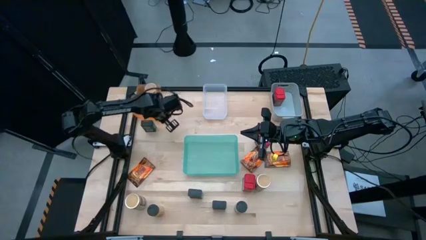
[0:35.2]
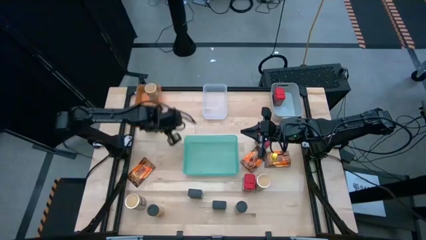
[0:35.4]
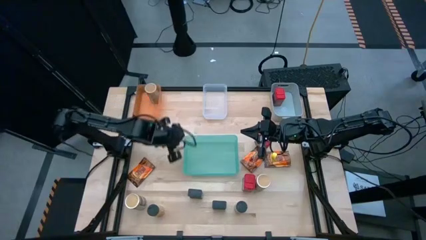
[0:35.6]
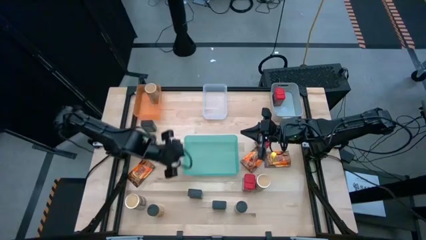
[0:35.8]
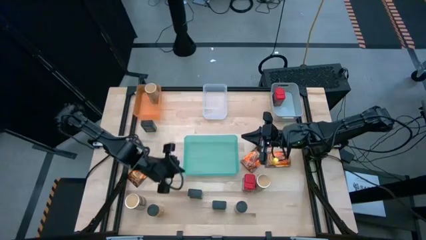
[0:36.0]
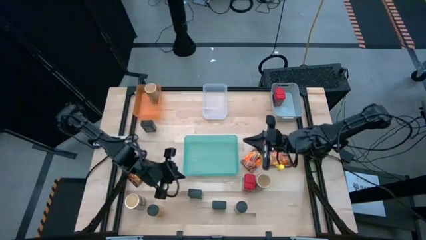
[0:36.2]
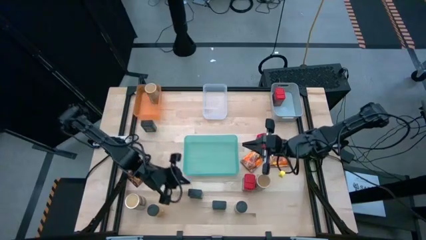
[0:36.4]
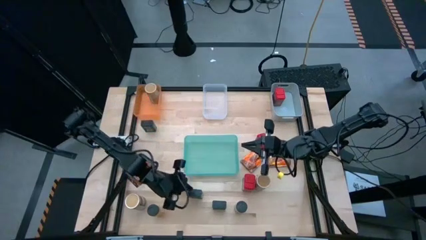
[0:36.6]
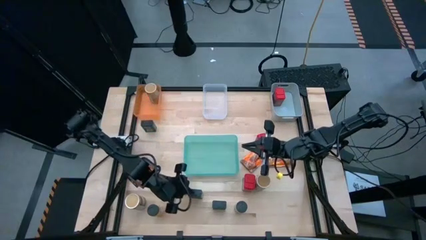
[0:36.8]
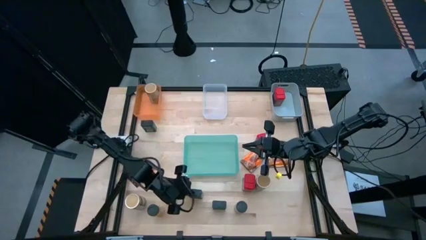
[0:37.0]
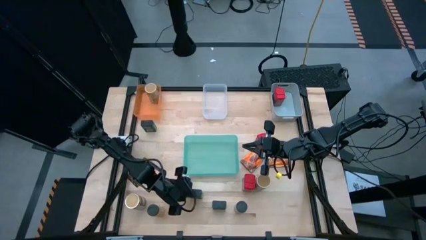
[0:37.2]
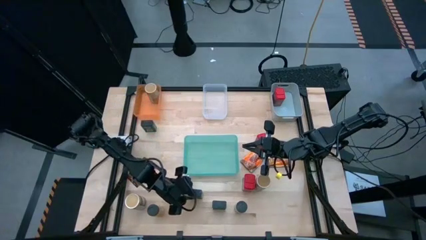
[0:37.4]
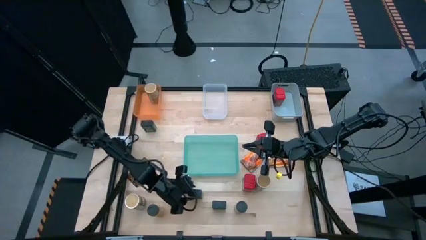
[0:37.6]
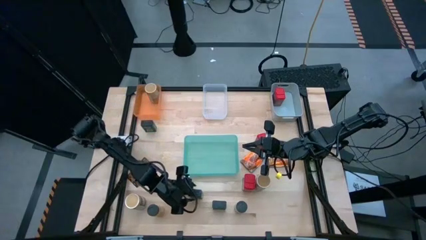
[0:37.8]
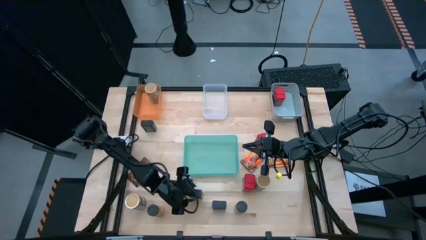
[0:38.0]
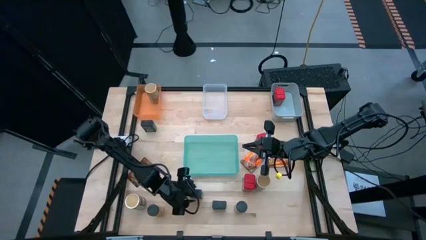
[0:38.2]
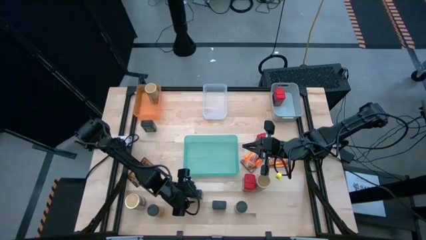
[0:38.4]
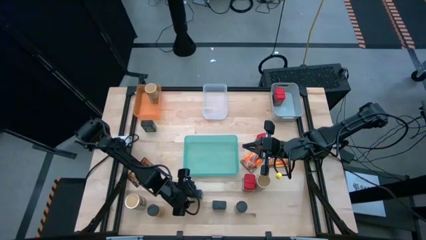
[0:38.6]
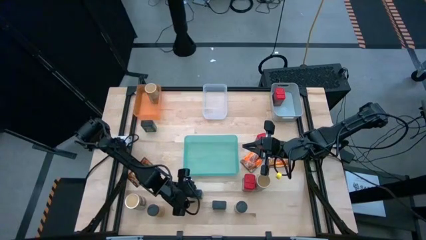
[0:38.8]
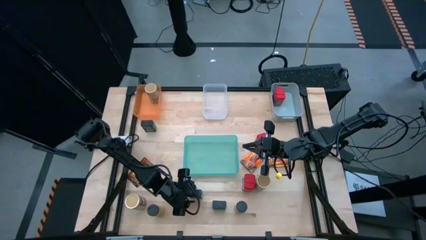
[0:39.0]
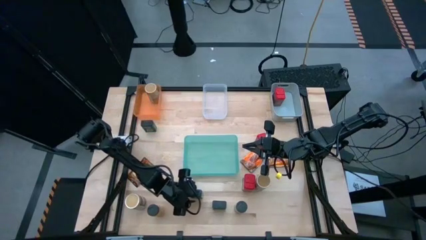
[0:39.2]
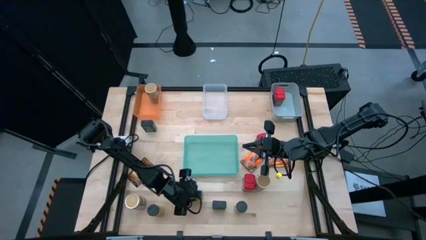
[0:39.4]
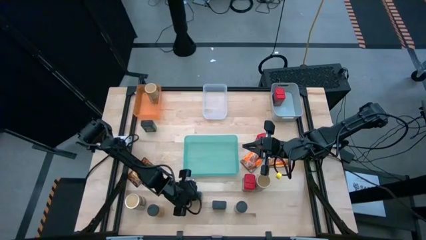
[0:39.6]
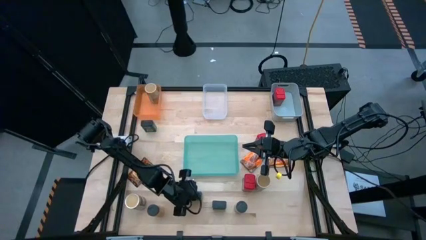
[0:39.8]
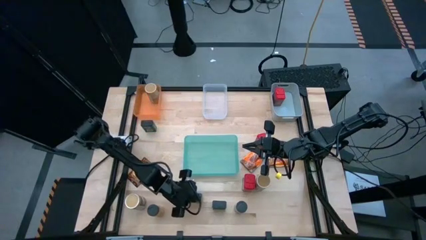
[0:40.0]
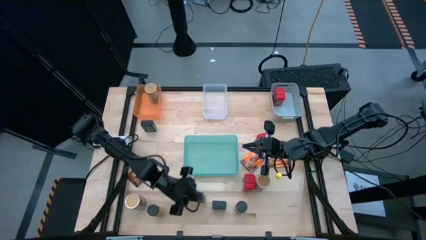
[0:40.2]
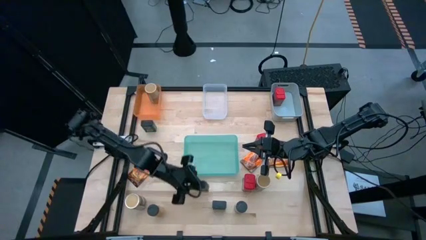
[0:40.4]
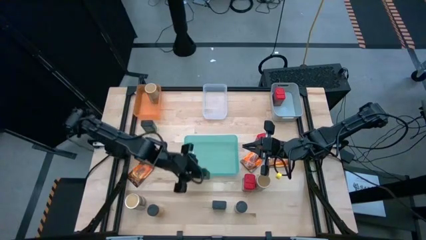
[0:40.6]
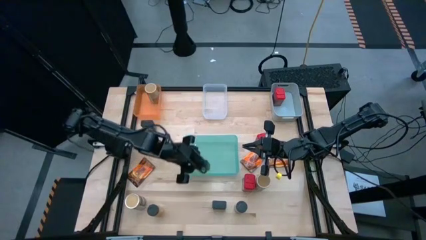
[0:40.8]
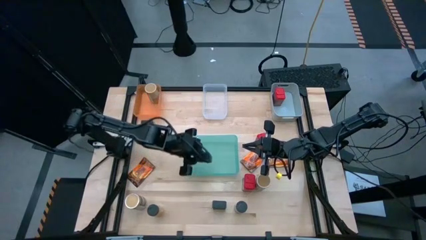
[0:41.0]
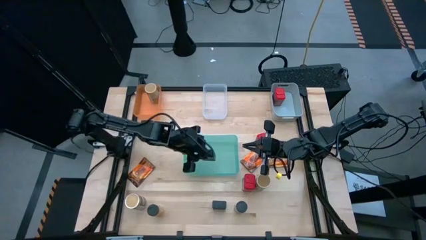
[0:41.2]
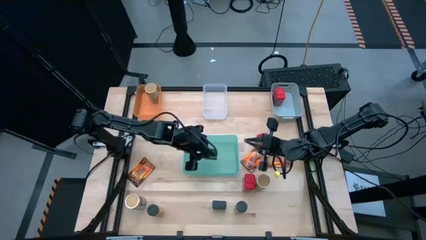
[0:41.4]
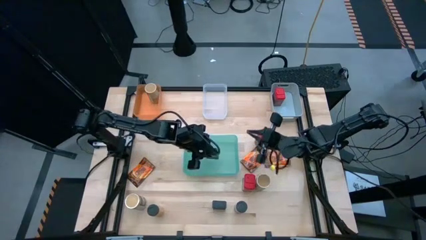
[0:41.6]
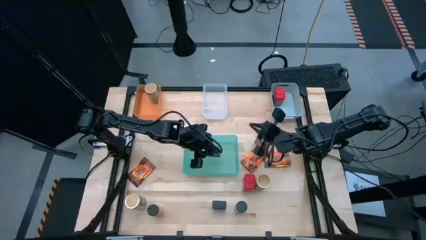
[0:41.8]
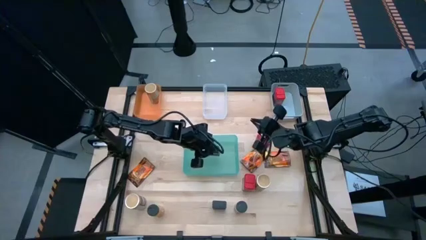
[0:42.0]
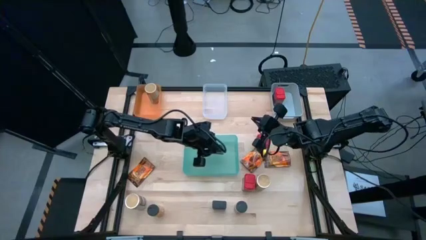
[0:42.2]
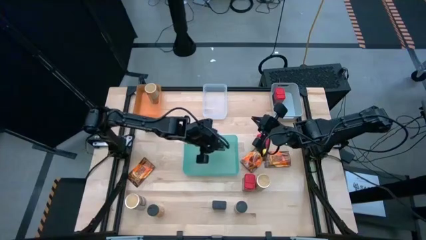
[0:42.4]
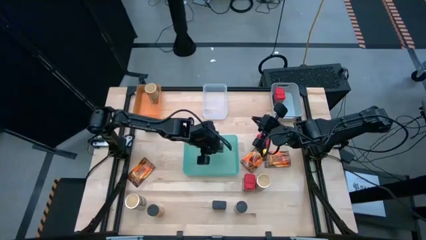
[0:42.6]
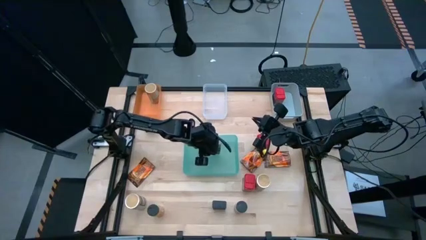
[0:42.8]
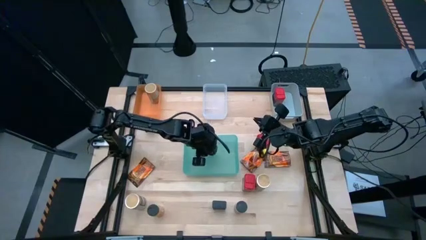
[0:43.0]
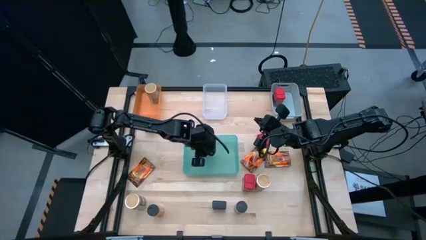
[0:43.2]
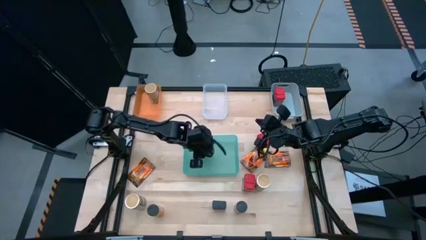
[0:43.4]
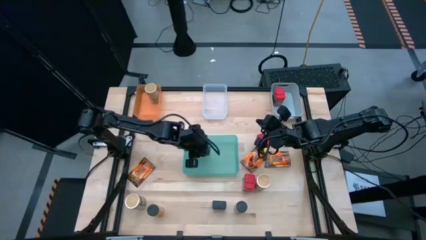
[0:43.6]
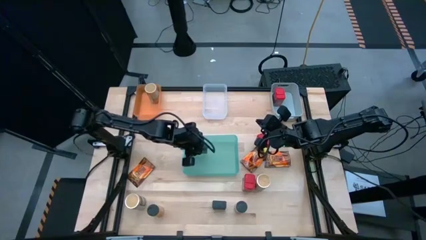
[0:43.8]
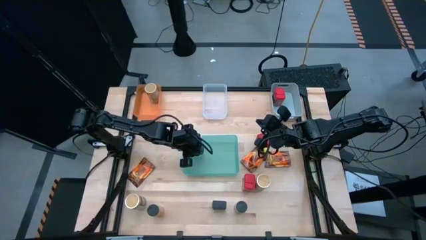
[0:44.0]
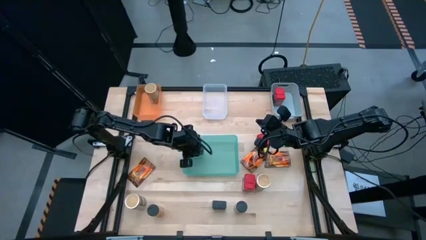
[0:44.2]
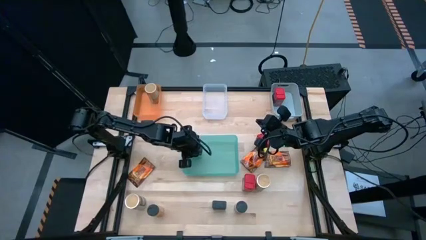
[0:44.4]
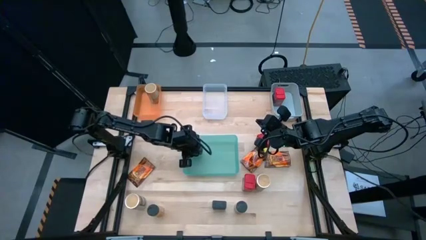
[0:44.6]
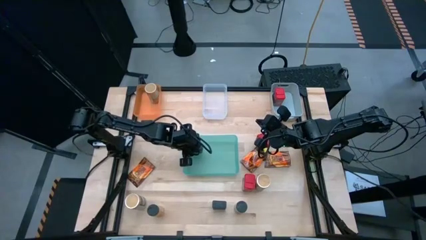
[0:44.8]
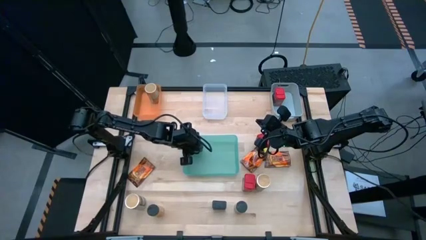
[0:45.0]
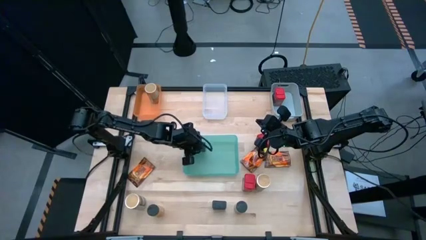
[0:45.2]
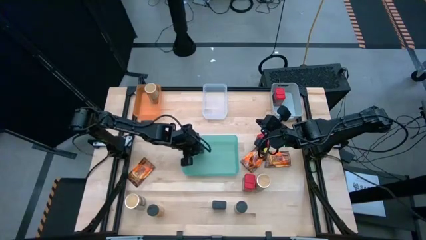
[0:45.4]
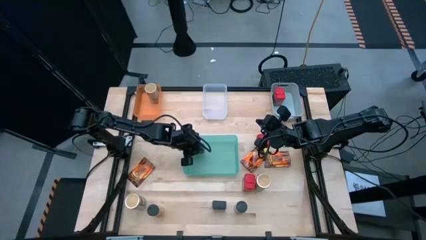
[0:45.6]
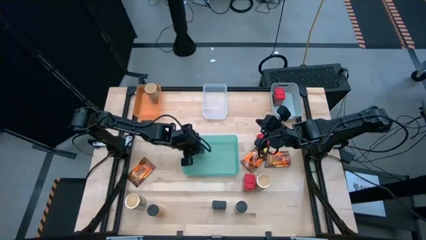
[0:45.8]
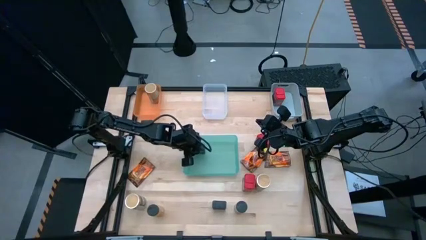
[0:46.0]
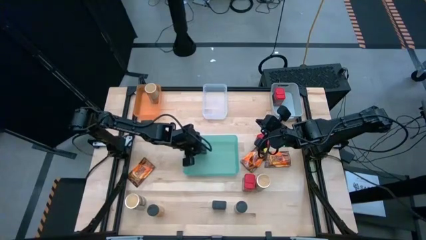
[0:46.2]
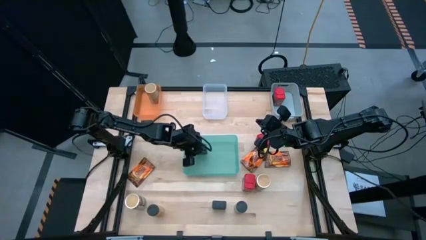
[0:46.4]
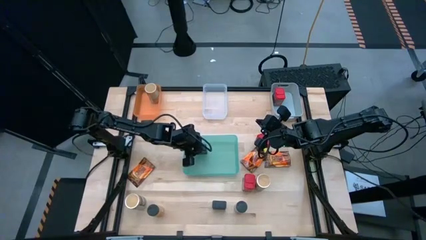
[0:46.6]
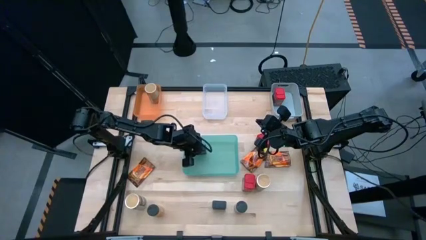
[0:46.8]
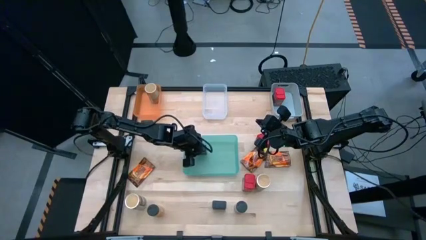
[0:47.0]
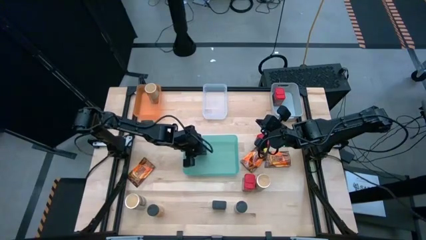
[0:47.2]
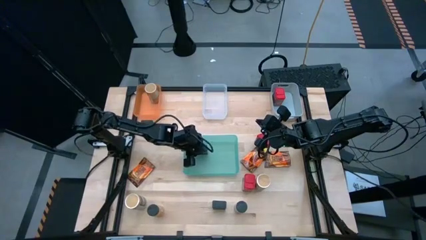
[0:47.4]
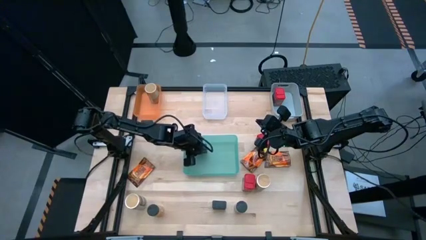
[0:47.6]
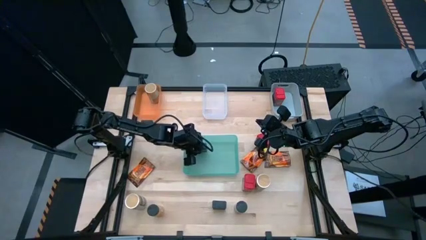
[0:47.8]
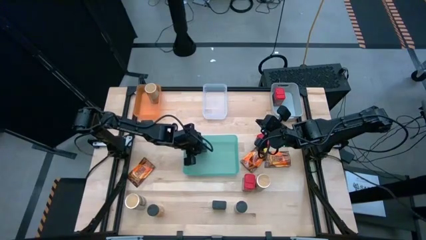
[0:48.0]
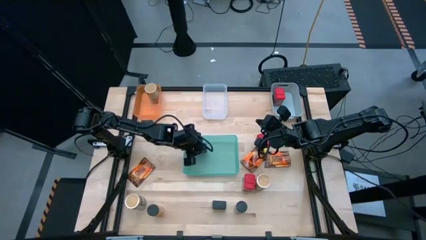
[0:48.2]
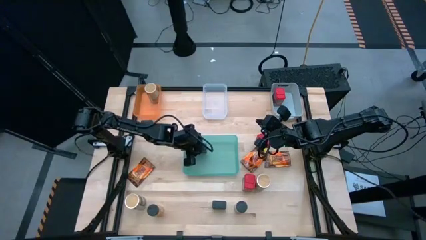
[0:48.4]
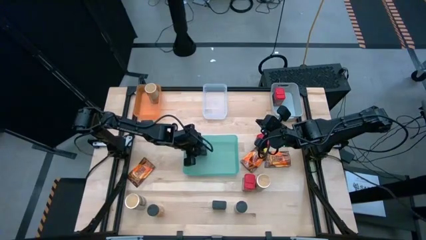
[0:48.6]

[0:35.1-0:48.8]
Task: Sort spices by type
Put the middle black spice can into the green bin

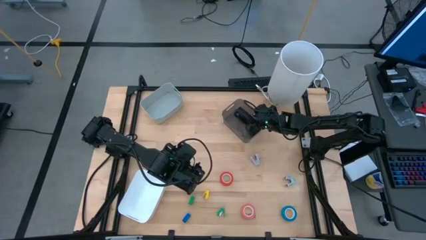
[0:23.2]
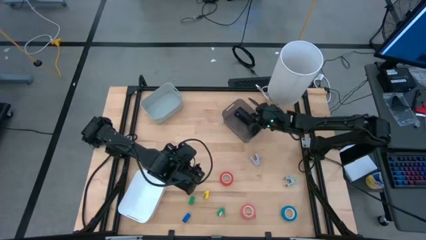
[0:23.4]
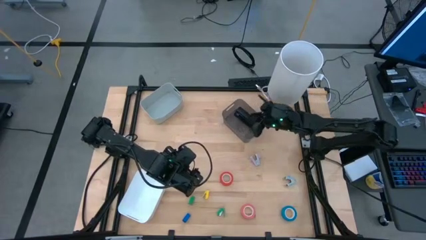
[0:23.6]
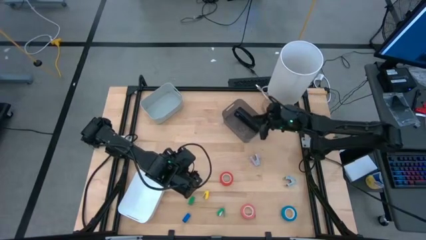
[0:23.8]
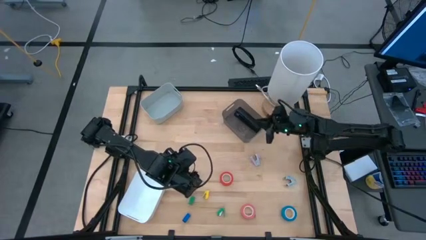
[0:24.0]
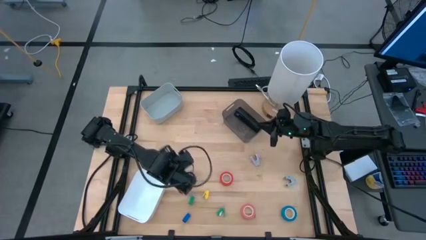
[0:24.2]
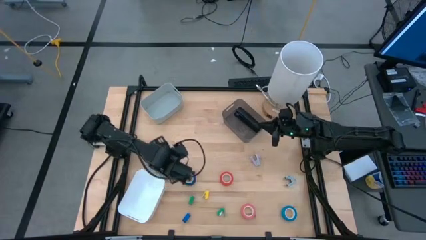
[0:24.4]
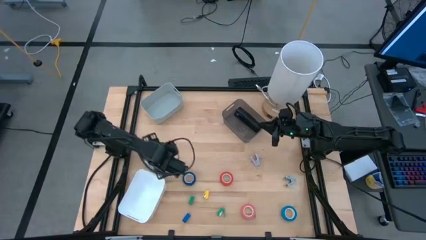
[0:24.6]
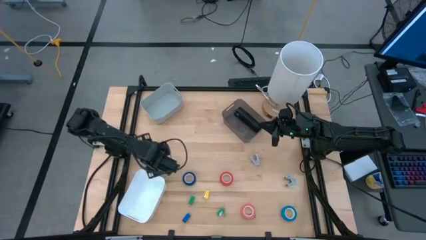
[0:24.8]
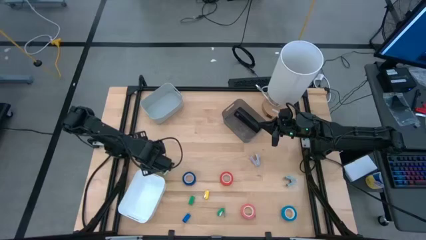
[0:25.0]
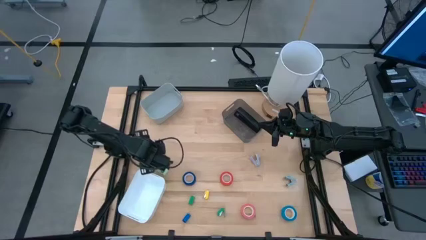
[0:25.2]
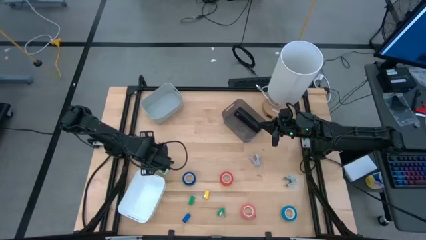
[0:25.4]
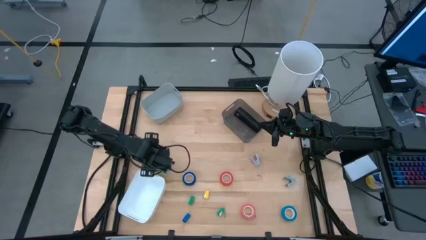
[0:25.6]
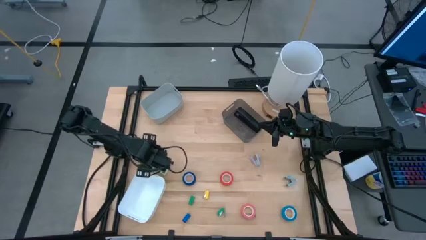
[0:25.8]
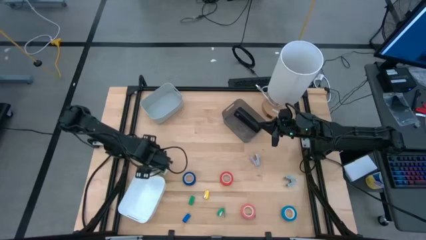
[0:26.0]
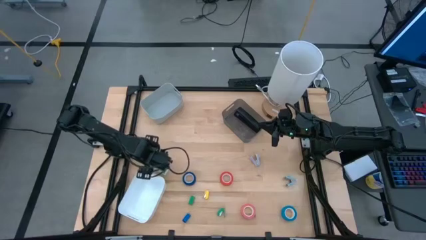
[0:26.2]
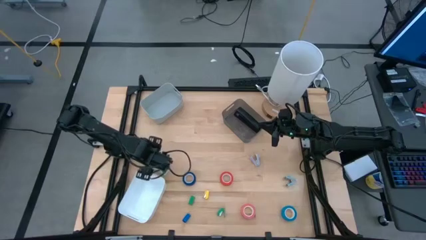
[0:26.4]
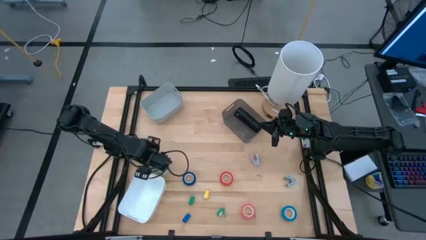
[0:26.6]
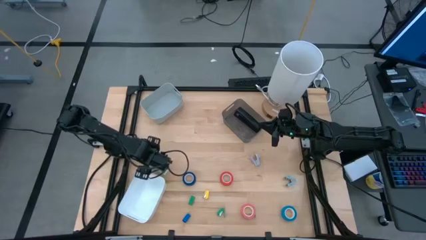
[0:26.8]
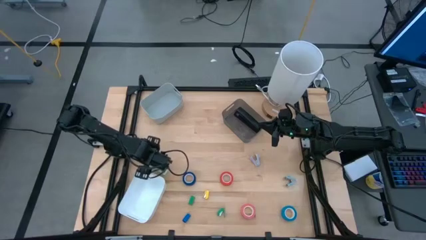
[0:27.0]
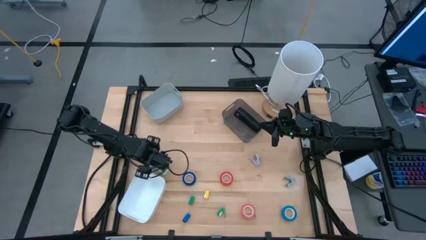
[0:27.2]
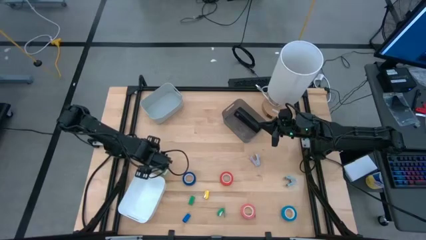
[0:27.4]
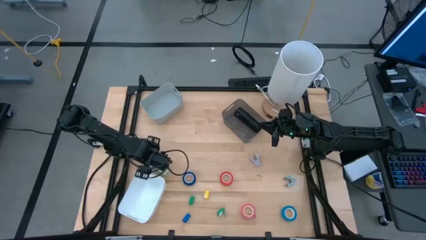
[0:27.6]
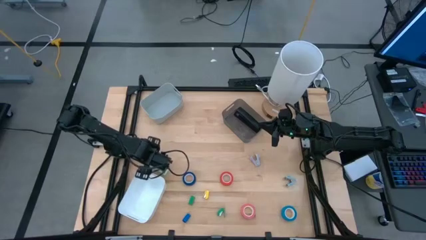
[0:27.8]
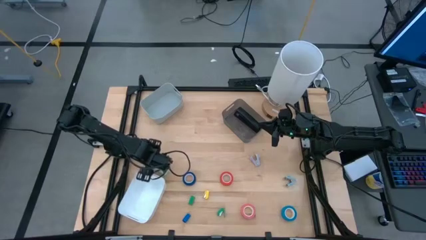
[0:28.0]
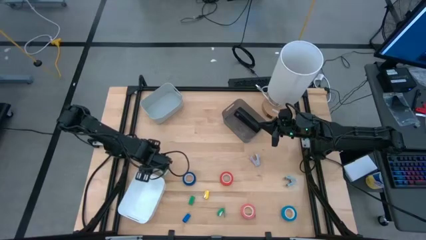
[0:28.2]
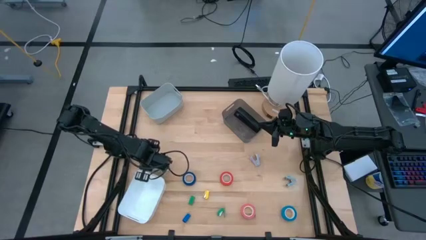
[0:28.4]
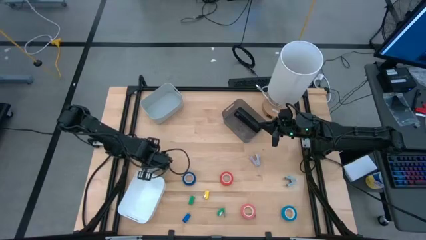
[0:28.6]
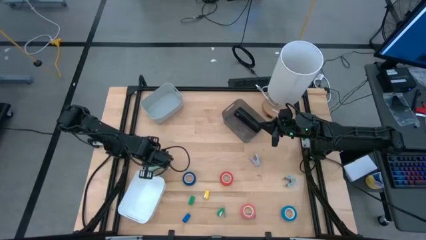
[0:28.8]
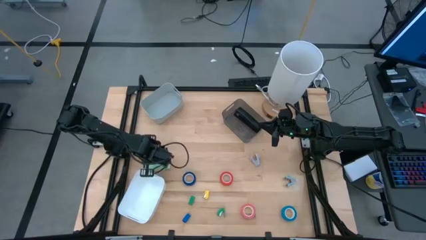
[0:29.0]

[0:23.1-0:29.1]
Task: Pick and place Stapler, Stapler remover, tape
Put the large green stapler into the black bin
